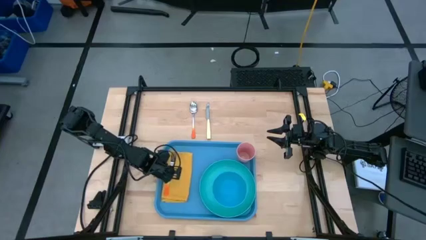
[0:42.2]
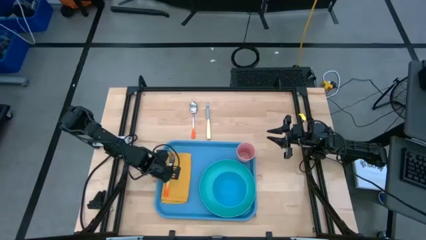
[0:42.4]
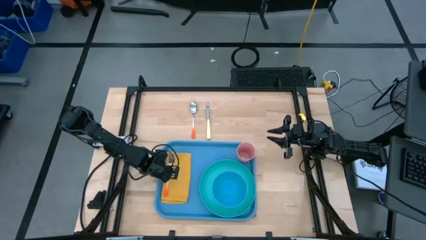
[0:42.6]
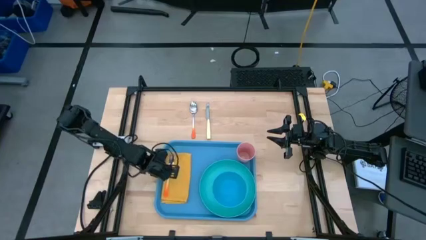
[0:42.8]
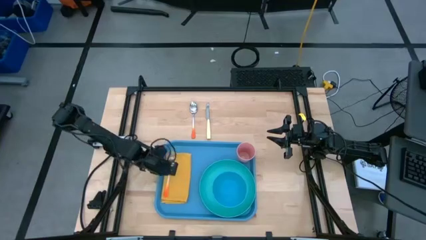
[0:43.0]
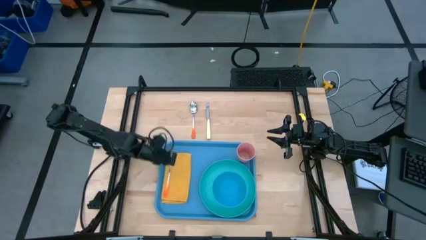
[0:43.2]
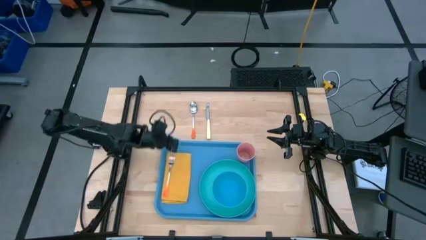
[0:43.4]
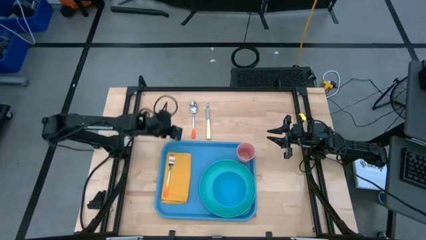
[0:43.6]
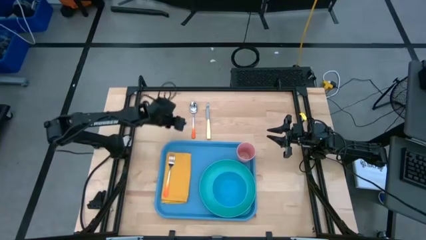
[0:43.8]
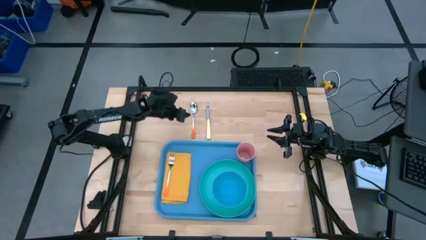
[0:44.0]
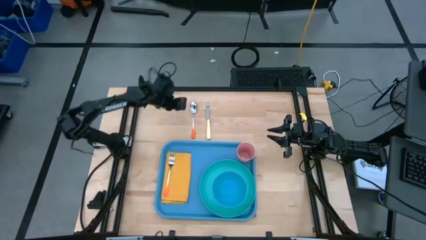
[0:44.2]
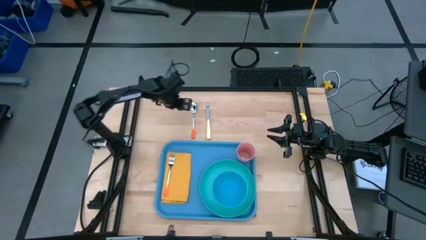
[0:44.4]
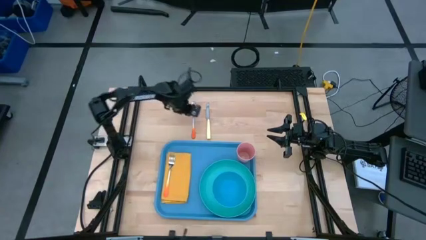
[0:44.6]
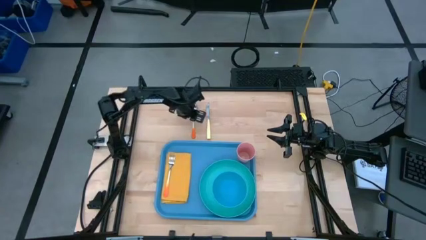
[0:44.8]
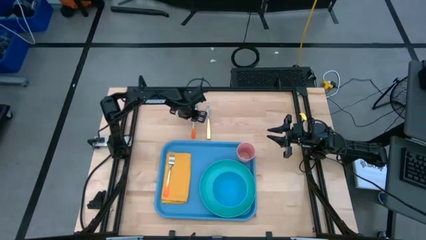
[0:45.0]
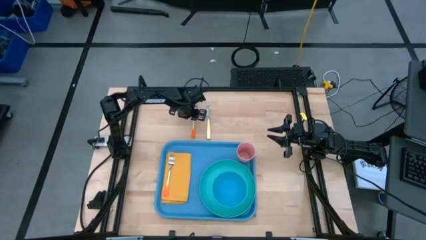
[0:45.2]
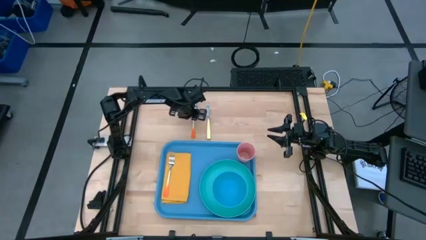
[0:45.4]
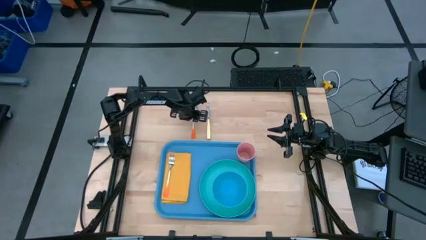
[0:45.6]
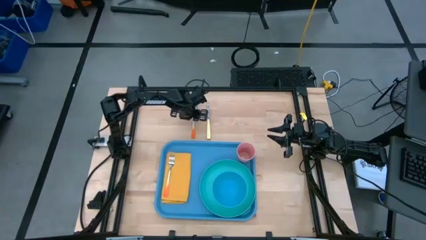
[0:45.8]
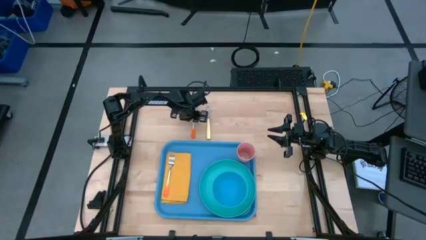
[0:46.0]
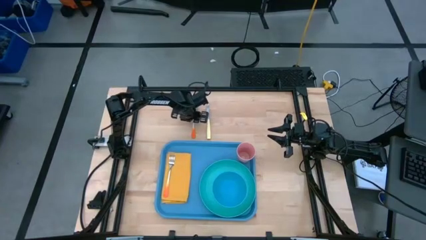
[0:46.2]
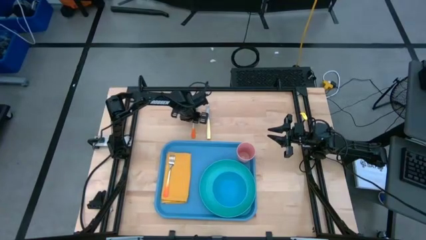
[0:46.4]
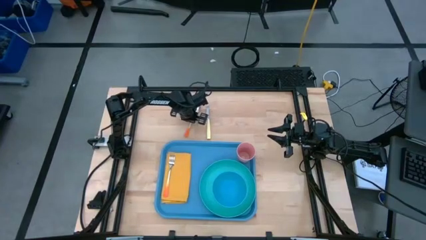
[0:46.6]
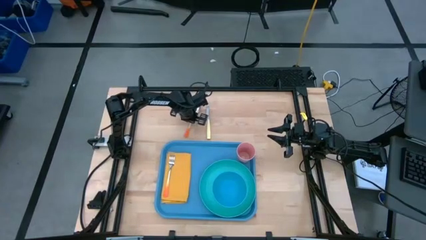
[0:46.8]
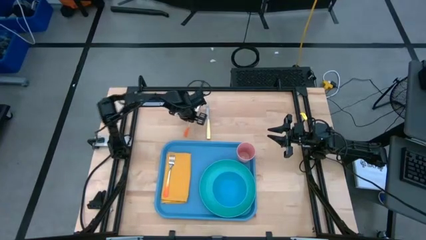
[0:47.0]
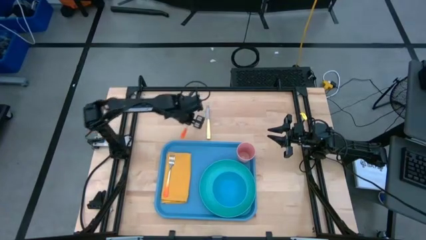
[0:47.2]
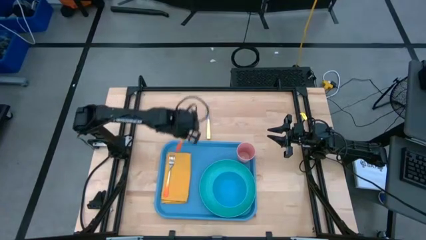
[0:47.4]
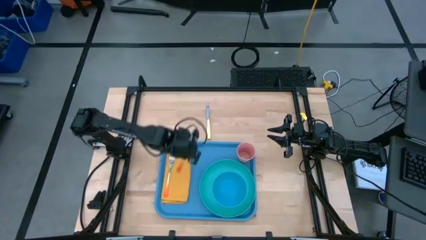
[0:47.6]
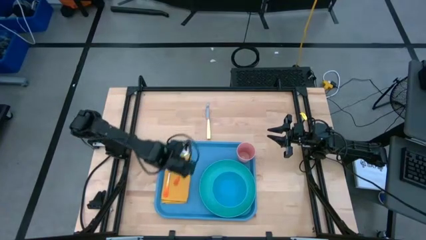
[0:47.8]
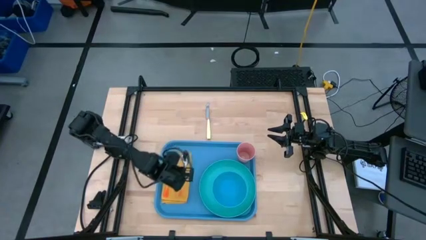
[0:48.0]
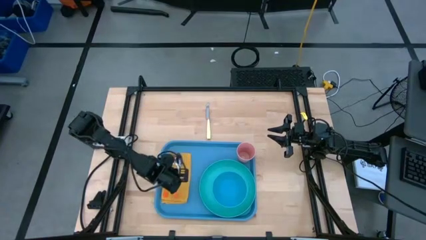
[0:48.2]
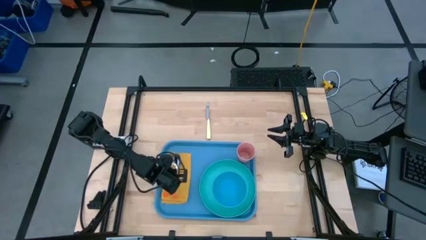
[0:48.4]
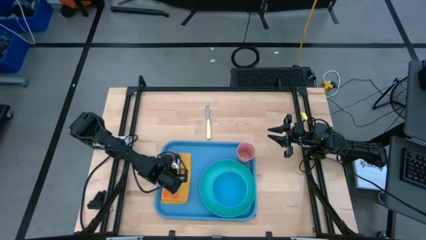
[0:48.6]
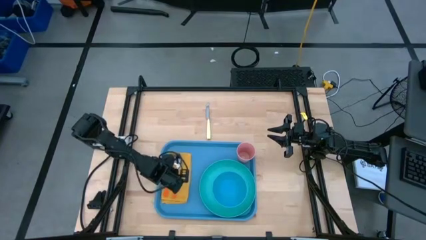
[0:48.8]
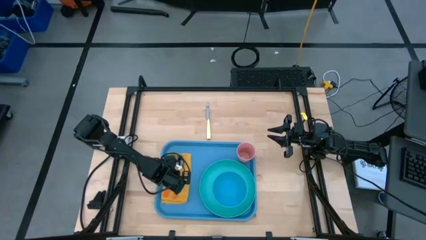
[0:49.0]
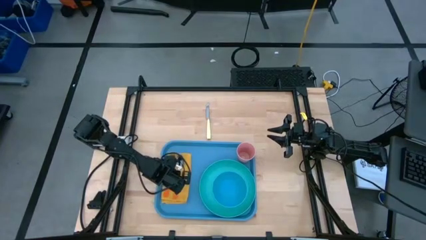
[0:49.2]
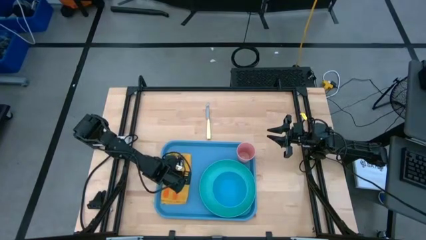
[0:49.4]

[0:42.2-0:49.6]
Task: Set up tray
Put the orange spoon to the right of the orange fork on the yellow napkin

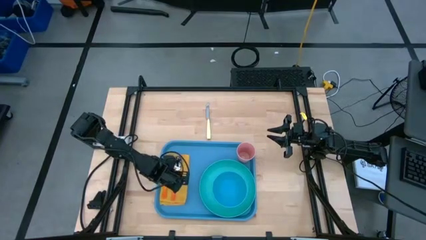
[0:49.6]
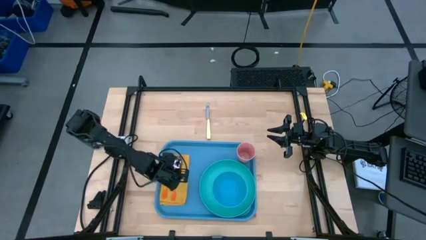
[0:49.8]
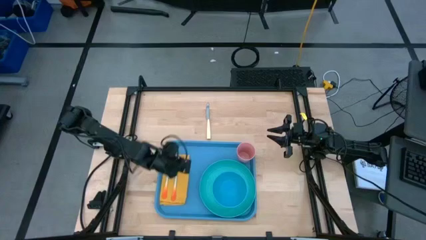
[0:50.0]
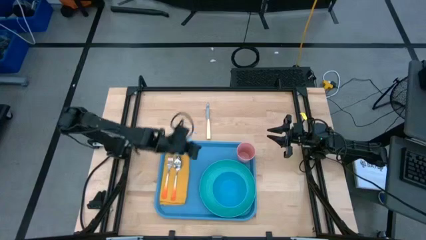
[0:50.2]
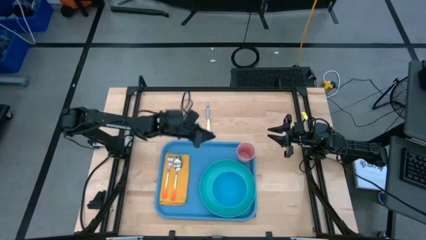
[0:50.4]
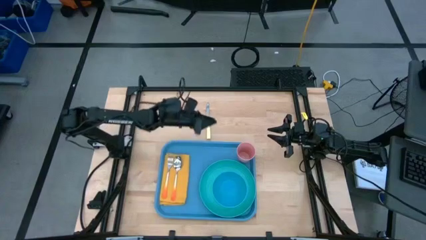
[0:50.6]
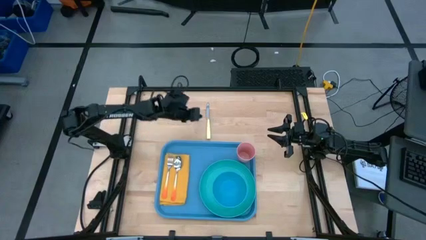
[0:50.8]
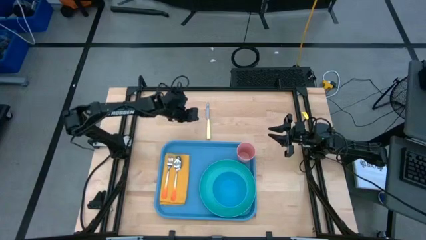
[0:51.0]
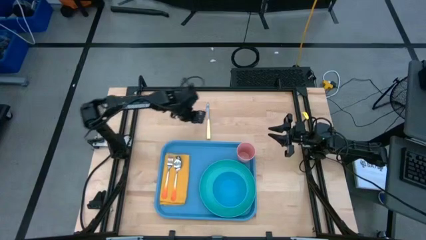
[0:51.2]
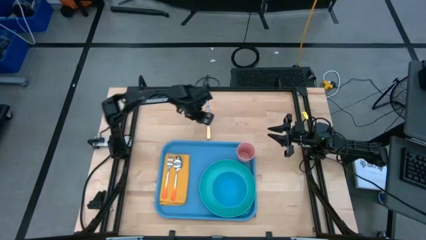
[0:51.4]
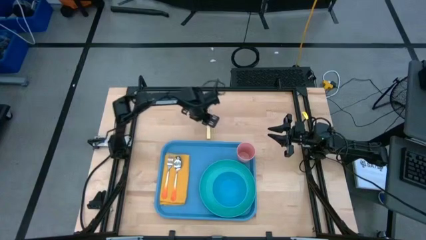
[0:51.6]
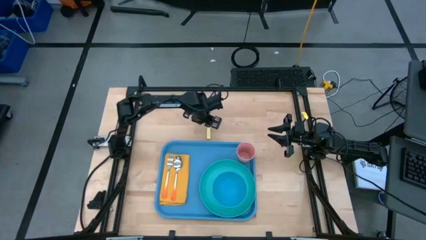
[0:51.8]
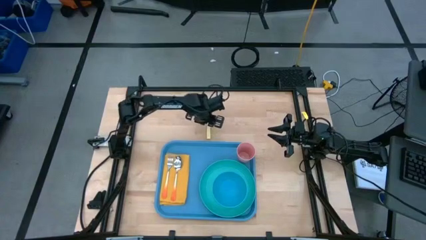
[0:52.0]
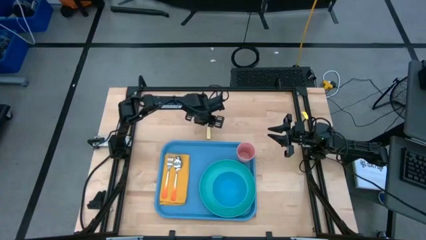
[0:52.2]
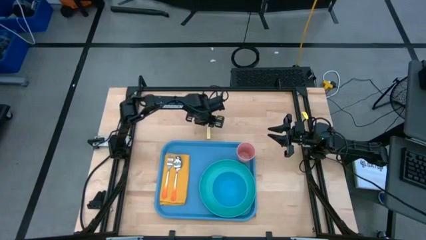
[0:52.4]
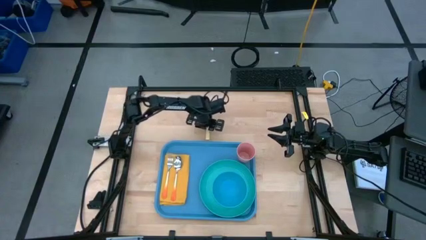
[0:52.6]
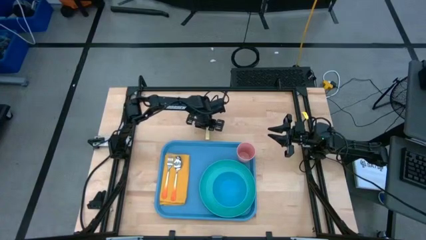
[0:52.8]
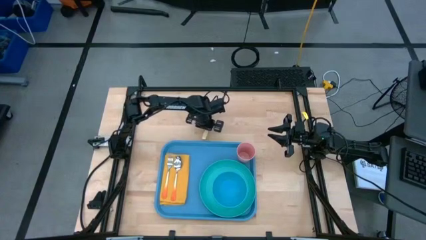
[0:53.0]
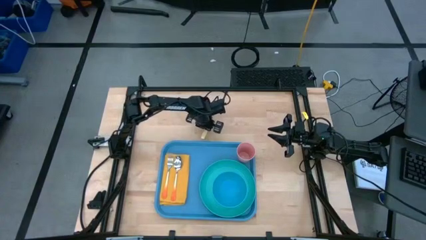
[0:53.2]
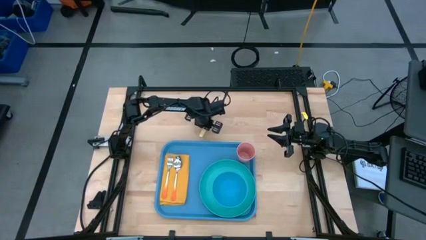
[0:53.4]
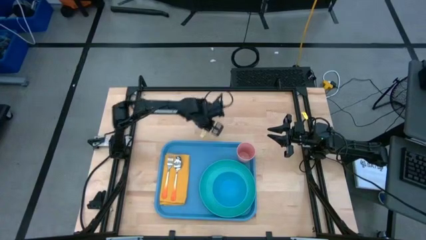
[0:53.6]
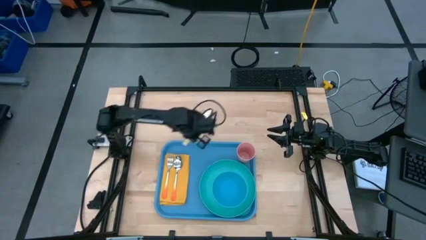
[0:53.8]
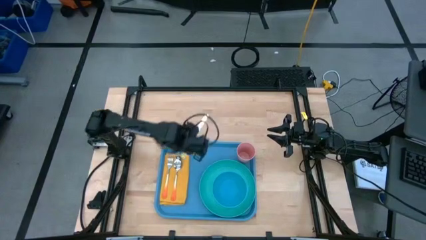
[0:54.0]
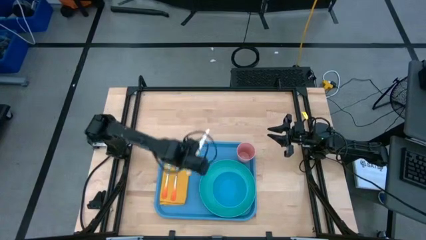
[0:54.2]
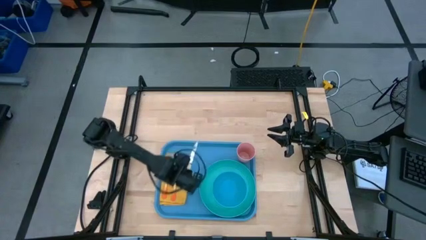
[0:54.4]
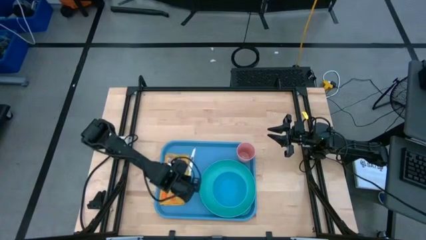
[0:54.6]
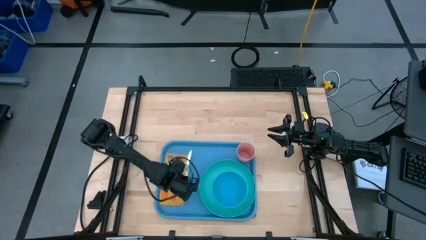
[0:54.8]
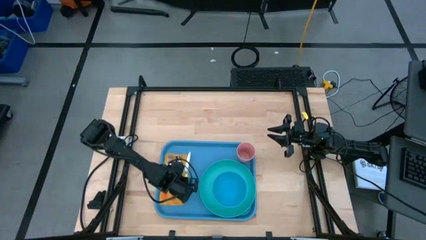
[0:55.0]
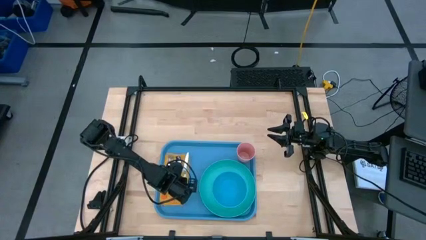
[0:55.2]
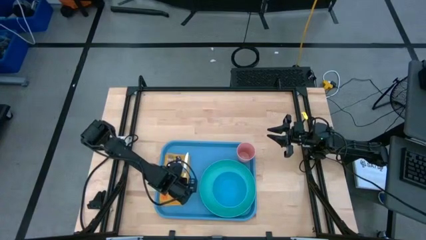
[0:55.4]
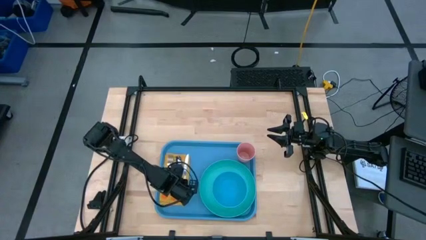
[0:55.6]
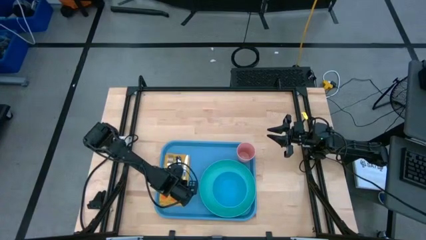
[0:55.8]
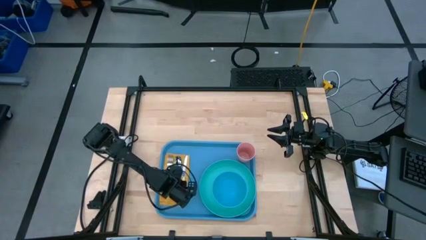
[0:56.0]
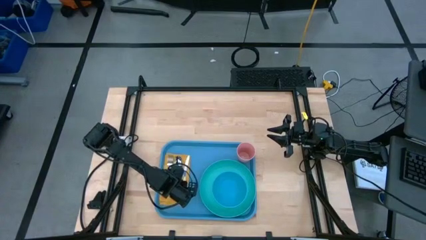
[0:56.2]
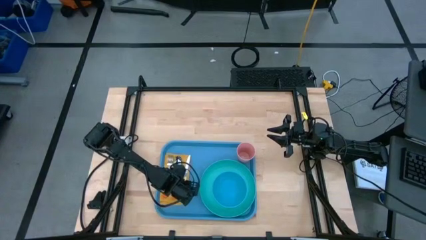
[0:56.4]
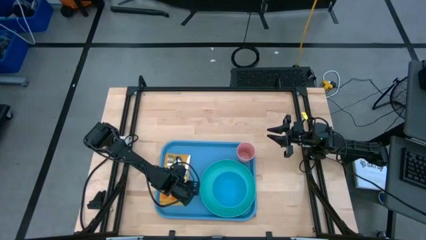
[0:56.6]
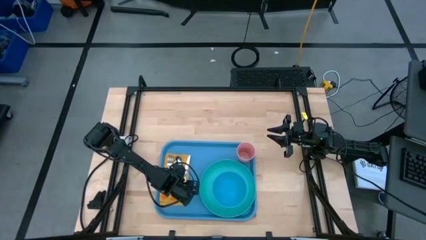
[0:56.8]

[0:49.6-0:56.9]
Put the yellow knife to the right of the orange fork on the yellow napkin

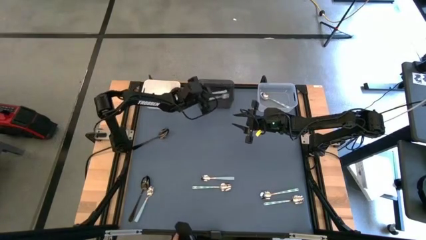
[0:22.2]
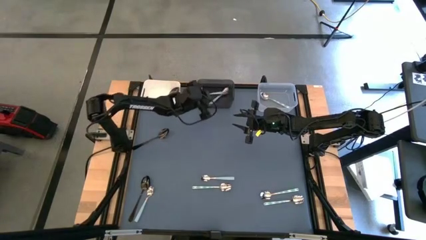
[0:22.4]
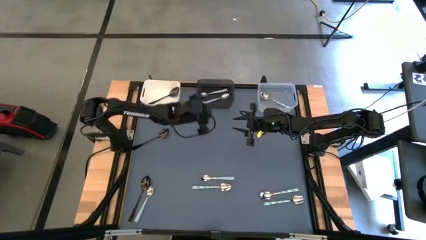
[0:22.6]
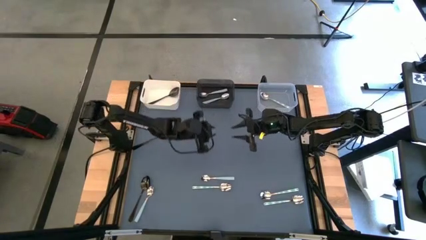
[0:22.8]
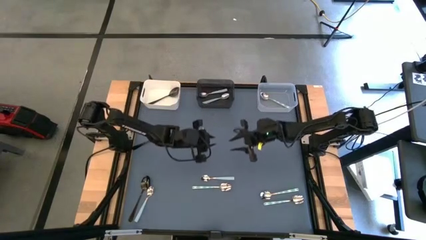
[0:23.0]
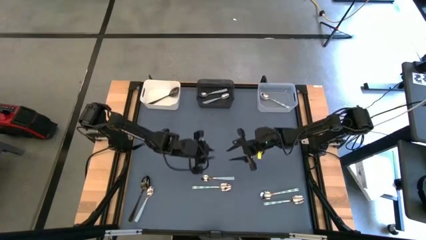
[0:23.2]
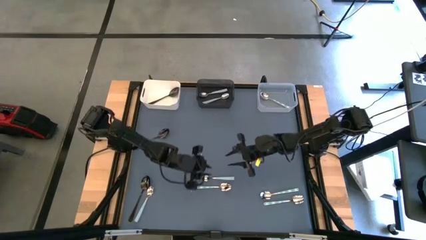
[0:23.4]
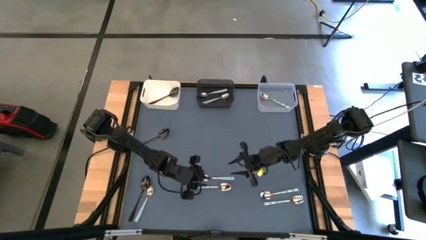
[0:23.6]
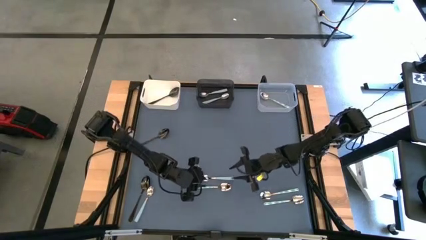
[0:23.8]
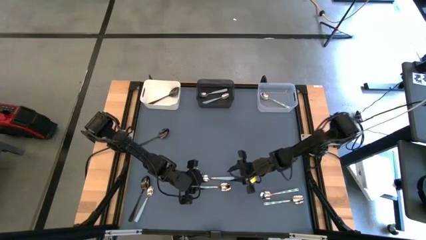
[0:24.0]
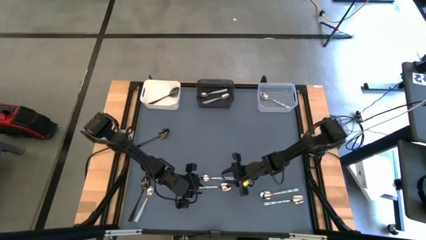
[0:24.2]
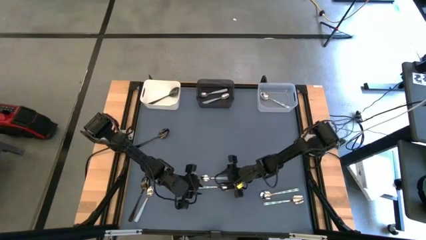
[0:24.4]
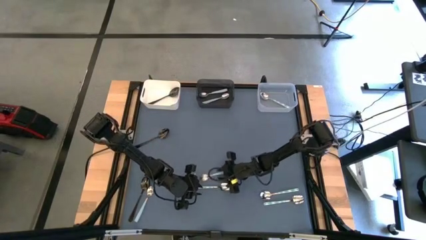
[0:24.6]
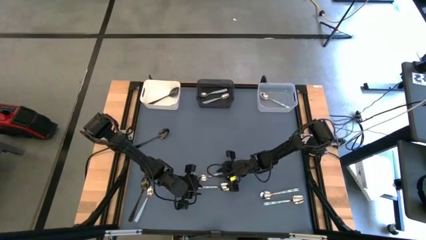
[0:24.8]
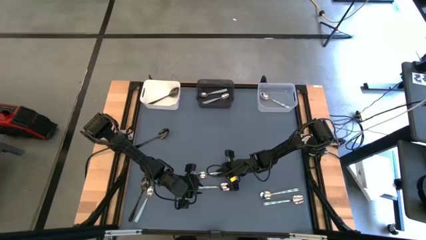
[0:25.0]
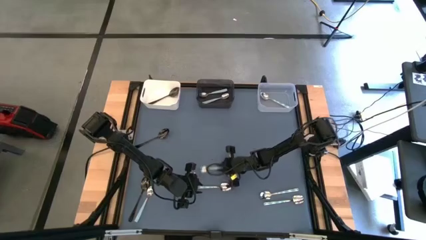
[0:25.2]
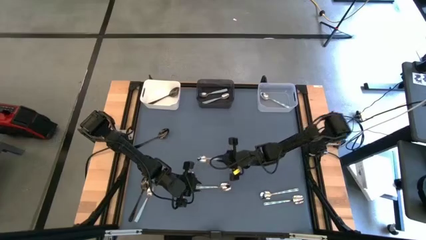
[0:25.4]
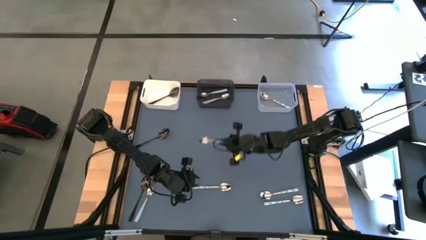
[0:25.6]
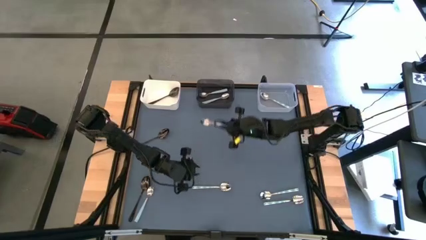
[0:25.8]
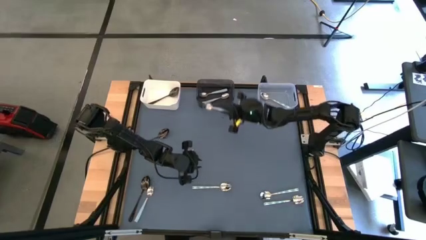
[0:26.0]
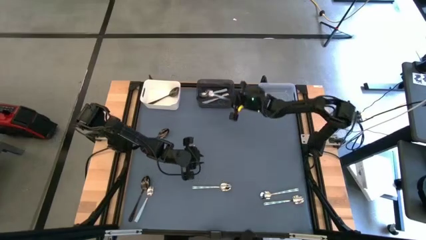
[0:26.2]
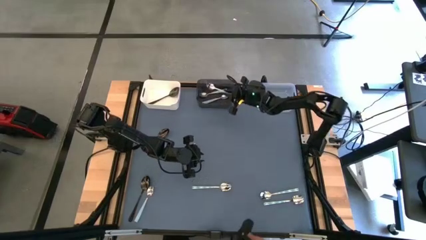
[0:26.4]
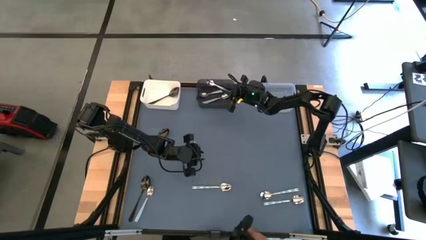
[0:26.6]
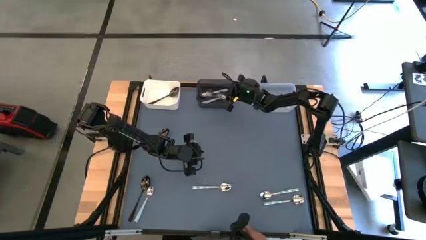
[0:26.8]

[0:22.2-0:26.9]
Task: Sort silverware by color (type)
Put the bottom middle sky blue spoon into the black bin
